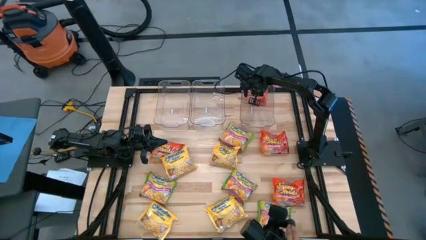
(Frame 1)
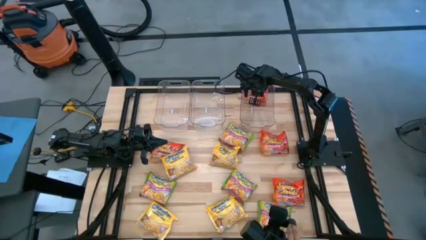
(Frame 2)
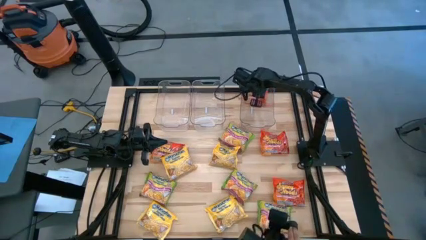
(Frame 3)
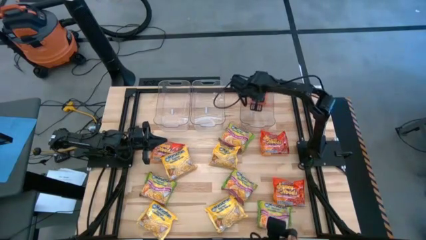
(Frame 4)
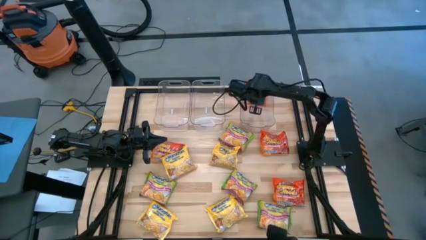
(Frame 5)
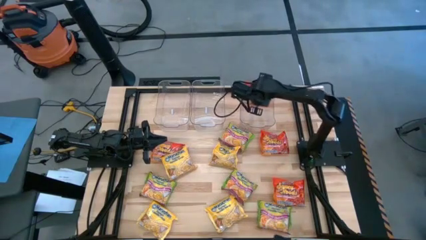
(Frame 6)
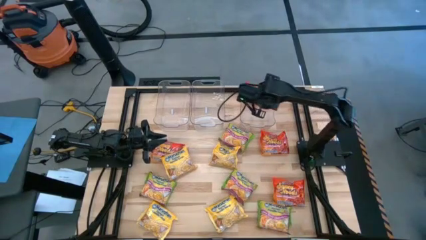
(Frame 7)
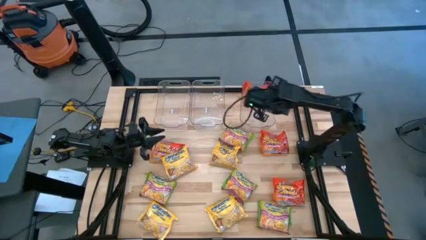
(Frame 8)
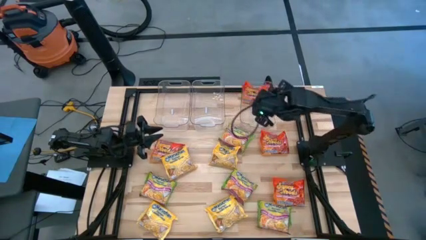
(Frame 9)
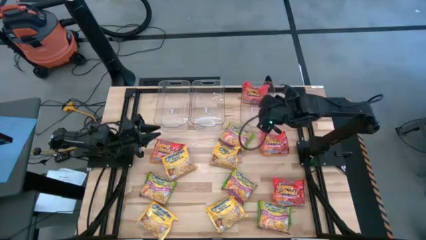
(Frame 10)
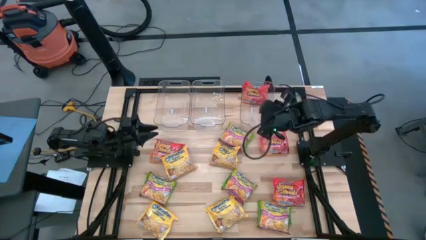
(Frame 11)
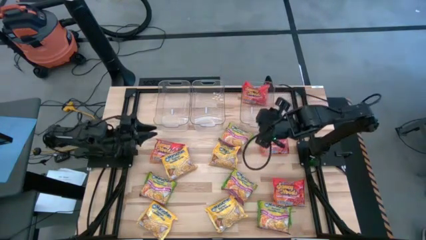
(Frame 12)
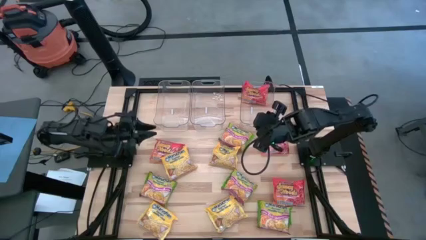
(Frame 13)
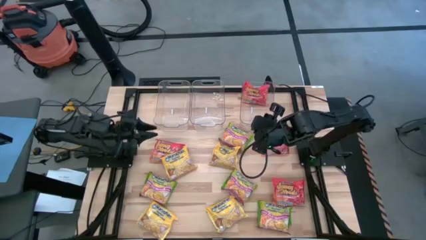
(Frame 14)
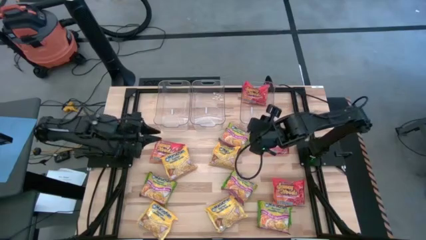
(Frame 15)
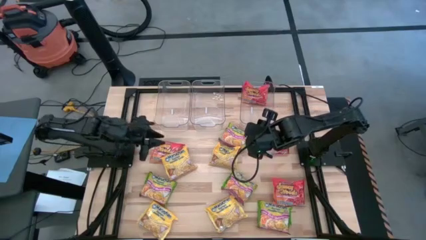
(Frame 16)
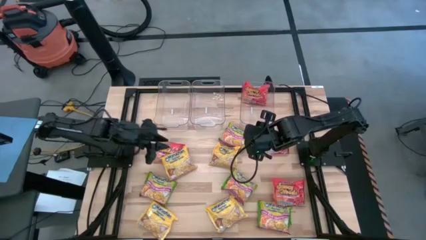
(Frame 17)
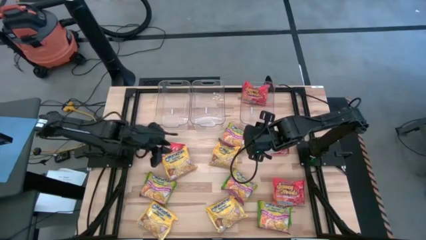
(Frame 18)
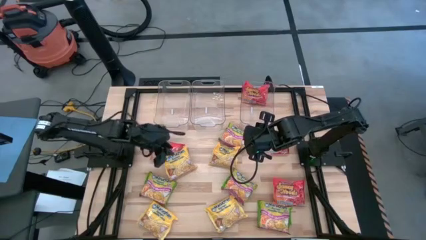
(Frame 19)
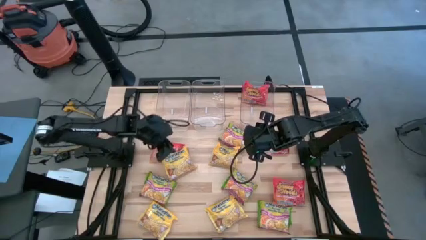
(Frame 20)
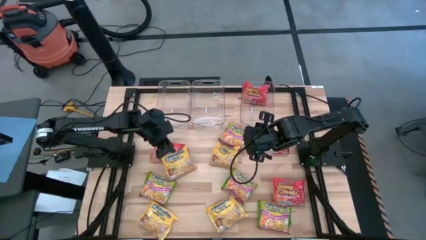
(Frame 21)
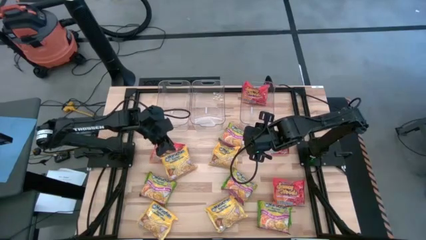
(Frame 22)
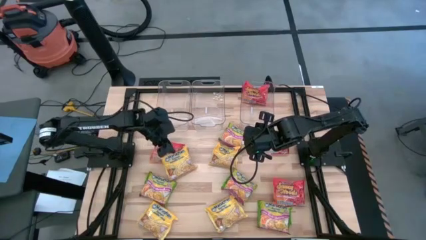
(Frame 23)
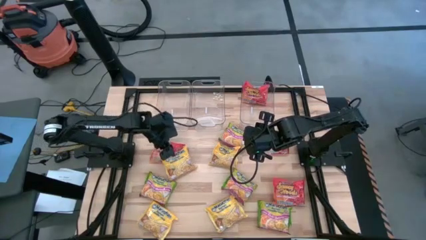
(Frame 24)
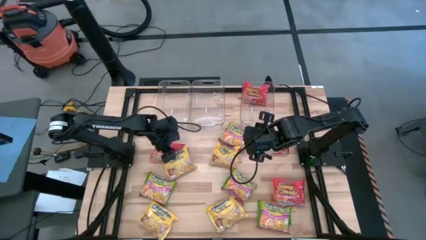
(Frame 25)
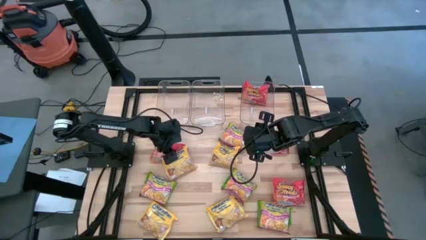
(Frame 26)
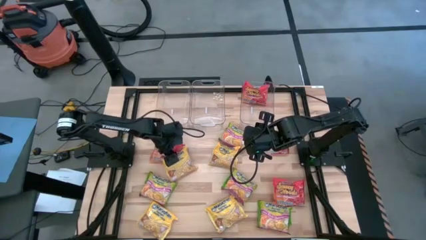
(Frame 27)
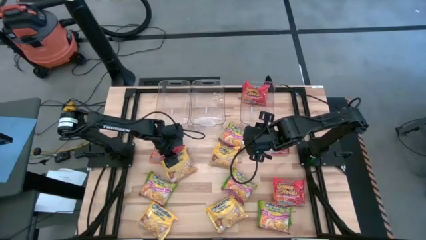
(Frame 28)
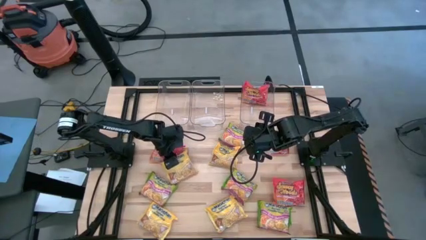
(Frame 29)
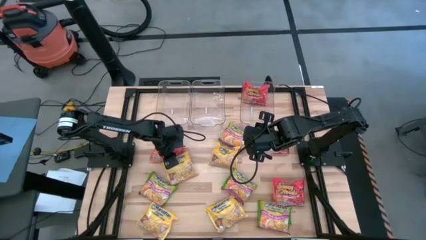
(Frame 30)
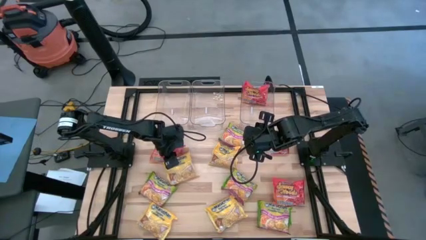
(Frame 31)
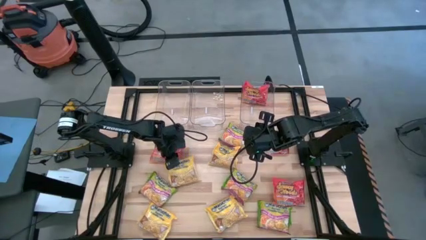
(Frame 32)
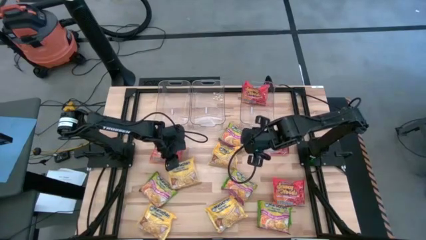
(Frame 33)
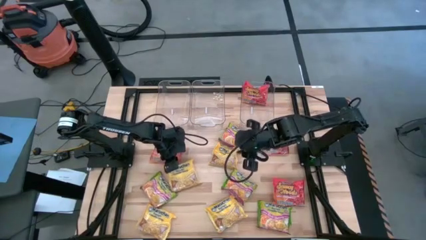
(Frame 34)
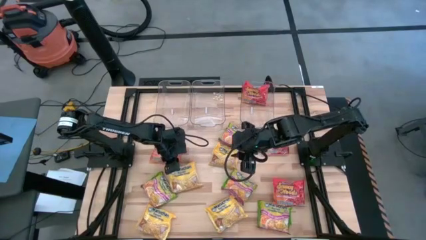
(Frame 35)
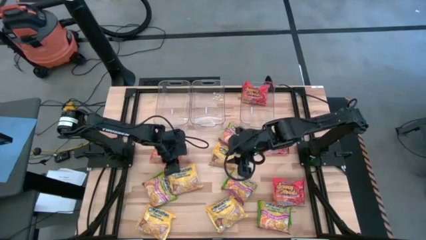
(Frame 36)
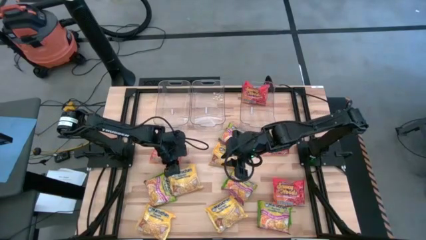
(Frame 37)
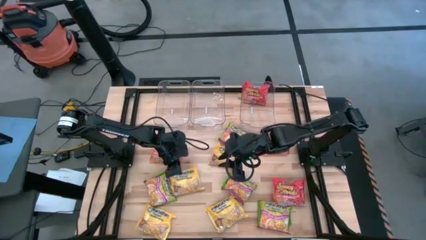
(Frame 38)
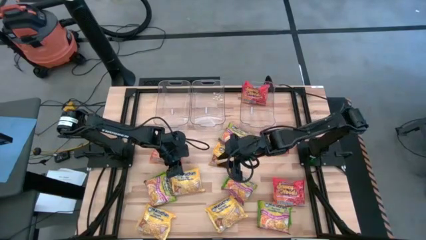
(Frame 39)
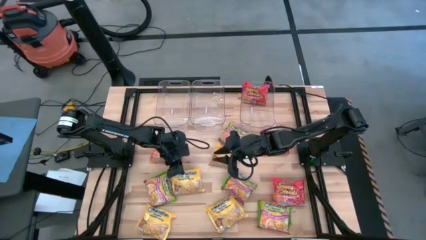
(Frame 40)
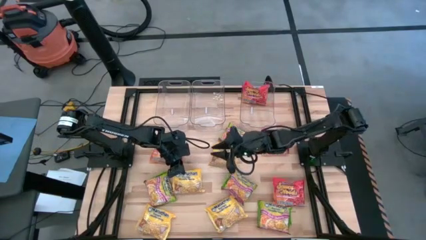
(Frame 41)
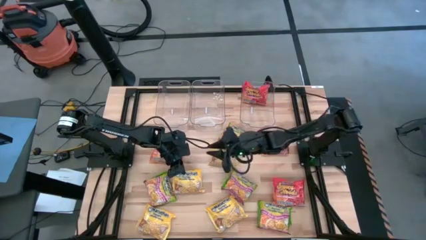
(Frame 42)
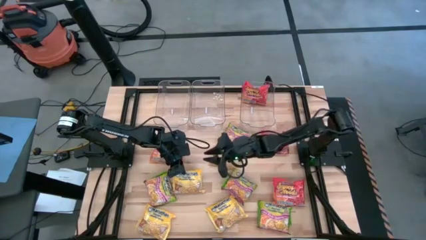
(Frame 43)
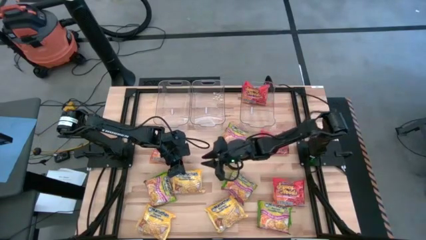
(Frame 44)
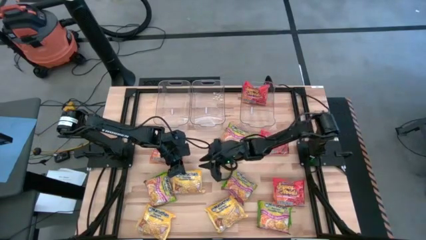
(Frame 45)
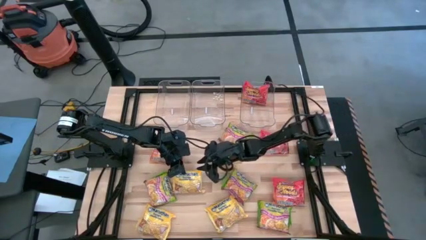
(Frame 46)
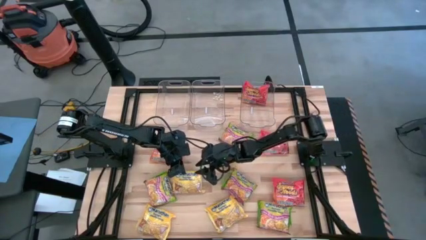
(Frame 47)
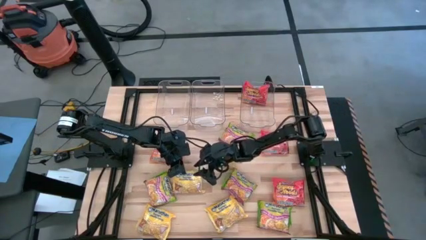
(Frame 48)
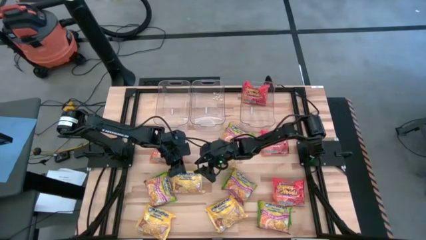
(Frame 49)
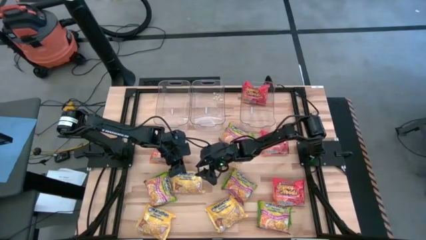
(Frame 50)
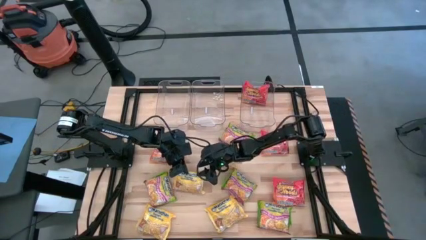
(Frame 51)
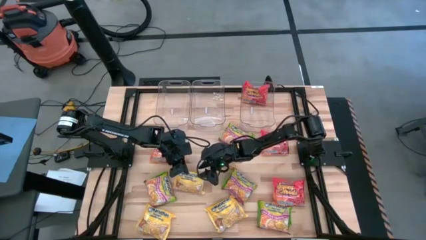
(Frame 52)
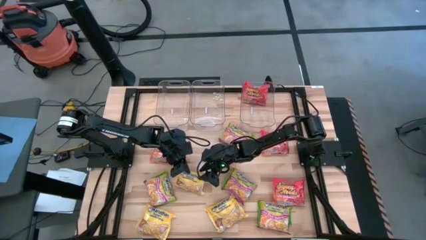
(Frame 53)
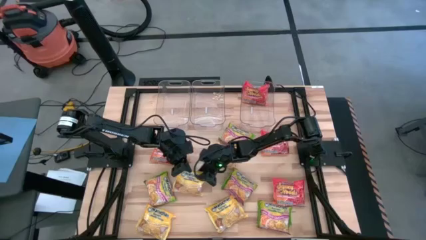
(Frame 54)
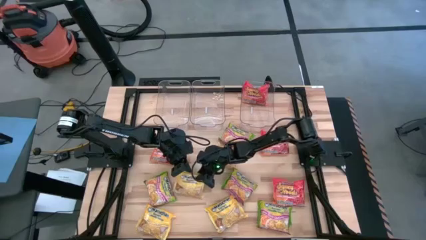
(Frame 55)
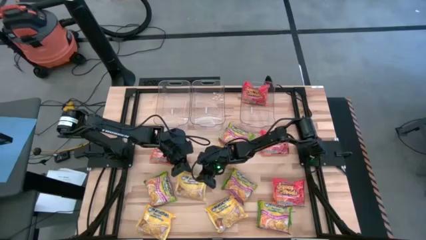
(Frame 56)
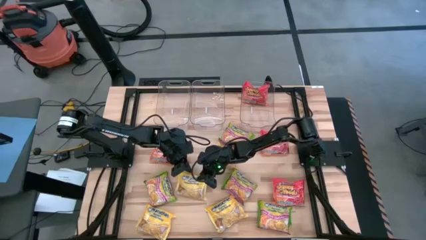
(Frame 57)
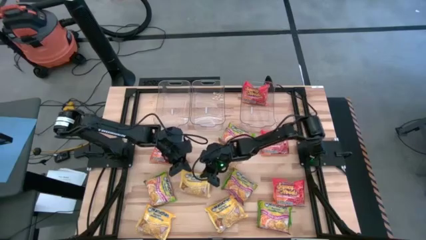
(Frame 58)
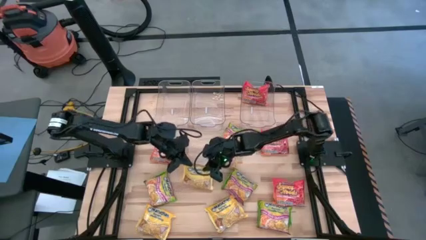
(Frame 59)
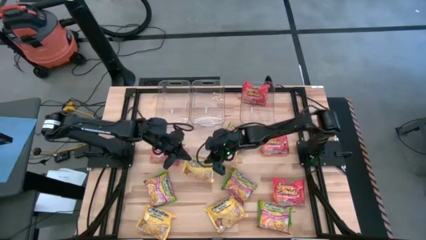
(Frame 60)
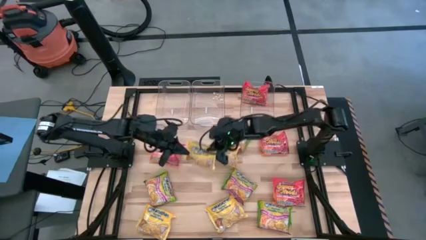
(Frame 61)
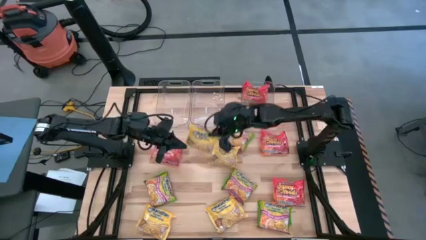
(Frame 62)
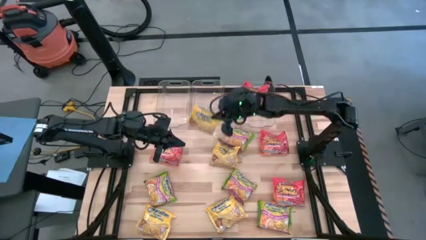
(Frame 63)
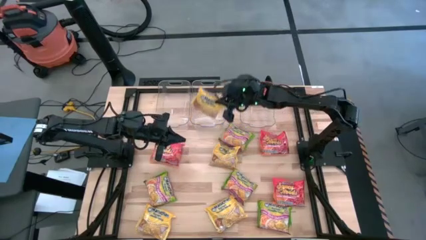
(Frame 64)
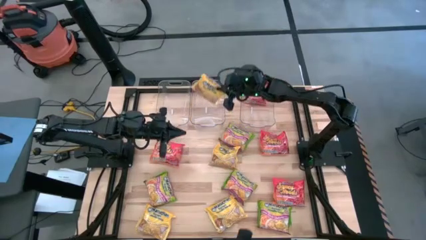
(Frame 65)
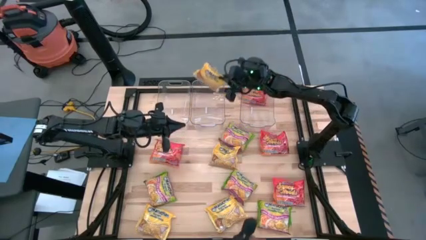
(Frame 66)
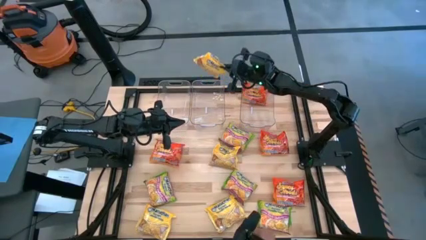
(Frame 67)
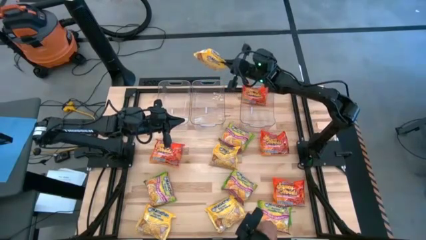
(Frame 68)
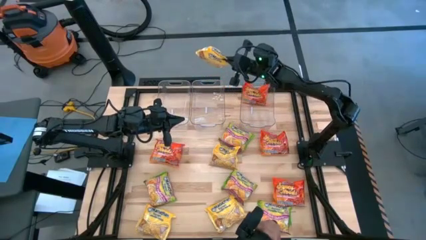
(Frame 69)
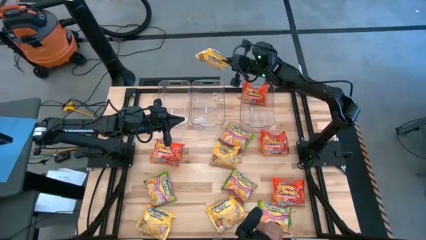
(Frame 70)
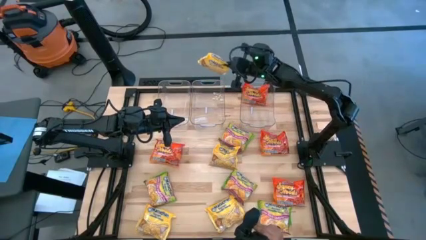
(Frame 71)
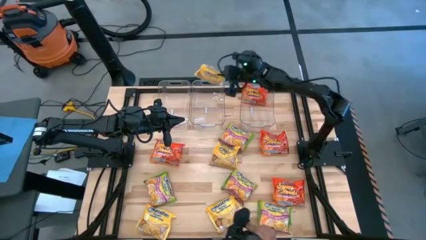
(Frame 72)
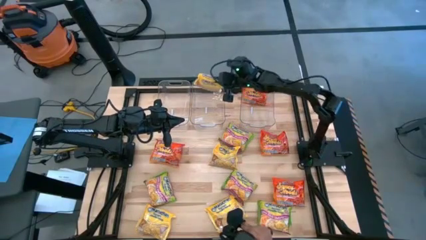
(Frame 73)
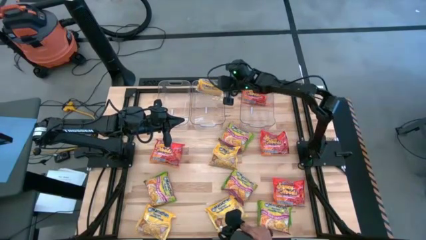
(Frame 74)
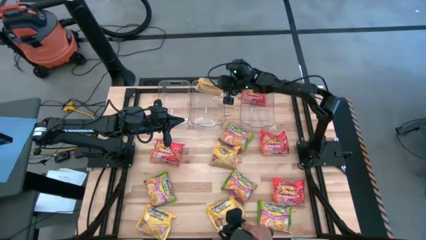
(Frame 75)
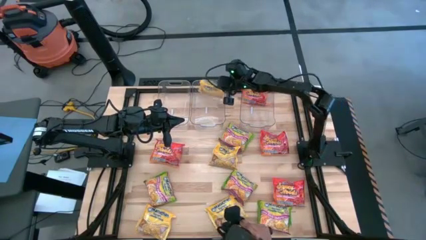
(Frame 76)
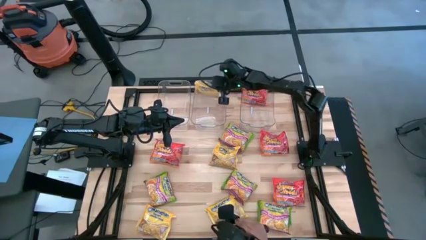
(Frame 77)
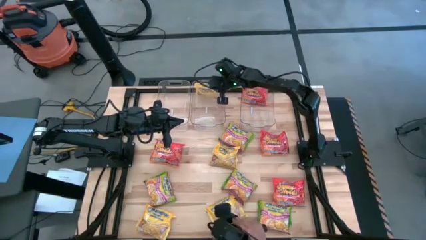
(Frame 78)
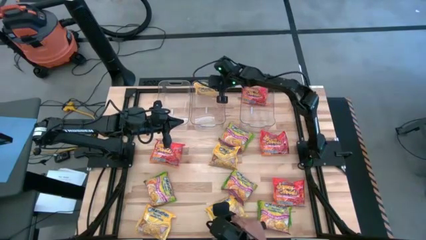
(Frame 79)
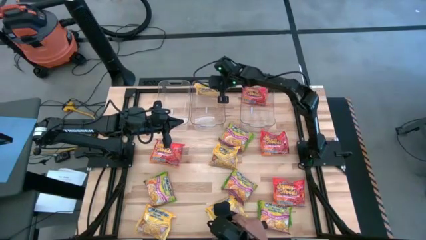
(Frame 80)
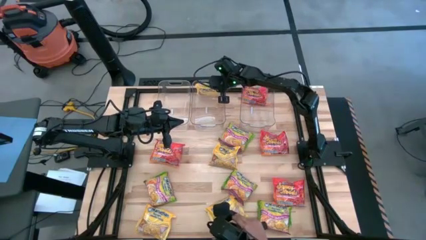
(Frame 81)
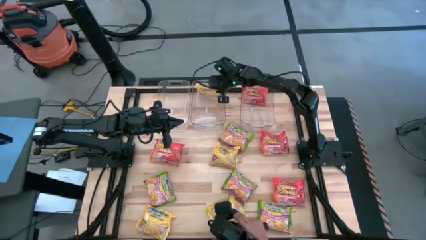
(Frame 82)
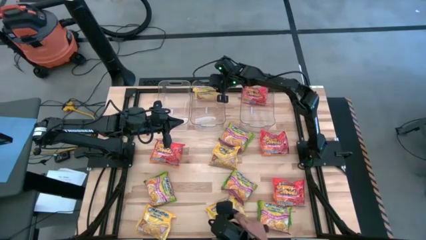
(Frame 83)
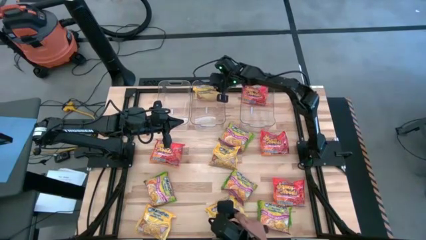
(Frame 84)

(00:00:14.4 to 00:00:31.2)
Task: Sort Maruchan noodles
Put the yellow noodle pack into the middle transparent bin
